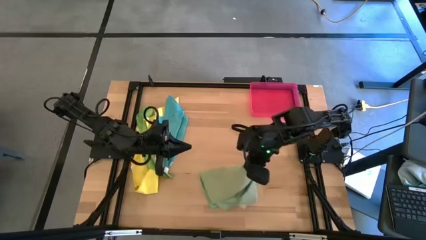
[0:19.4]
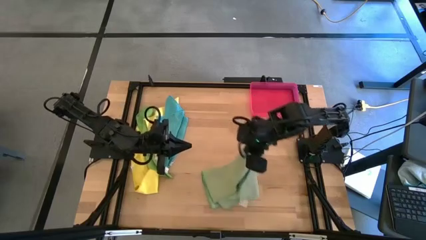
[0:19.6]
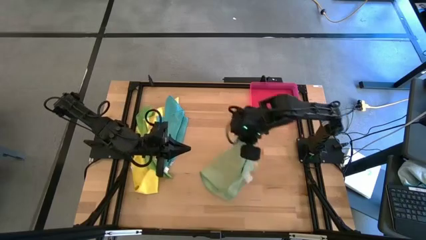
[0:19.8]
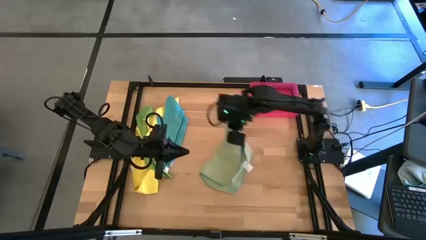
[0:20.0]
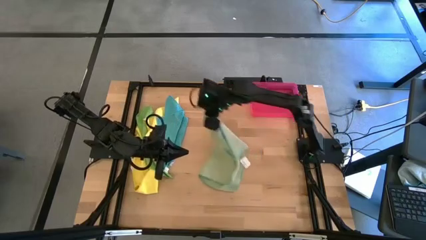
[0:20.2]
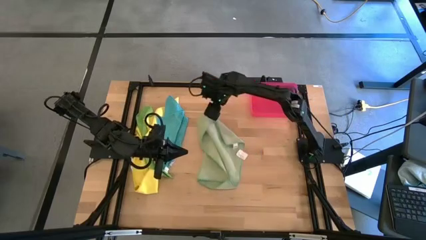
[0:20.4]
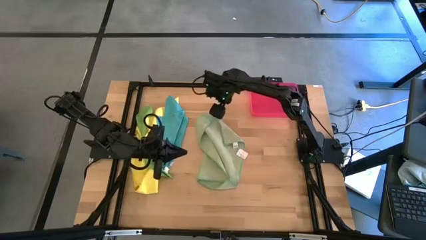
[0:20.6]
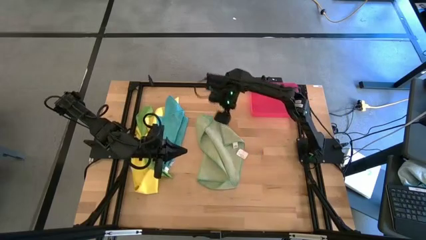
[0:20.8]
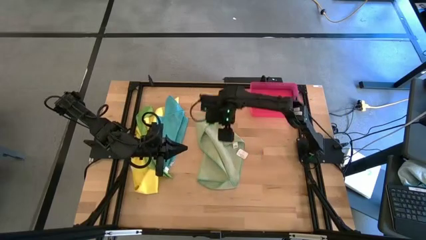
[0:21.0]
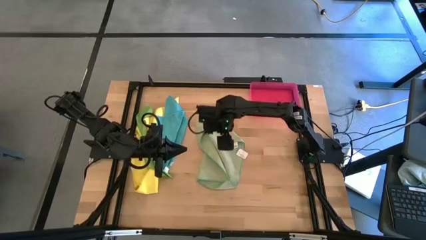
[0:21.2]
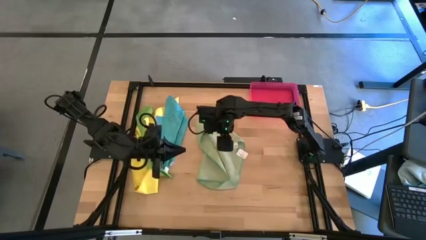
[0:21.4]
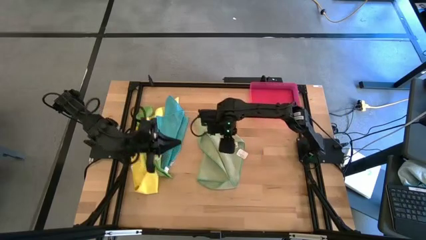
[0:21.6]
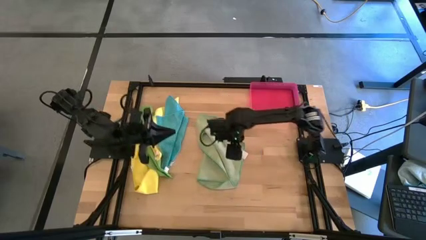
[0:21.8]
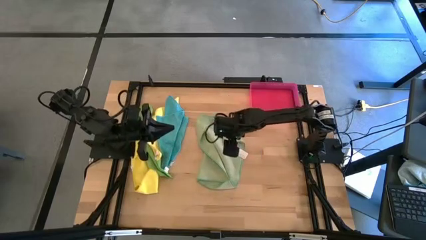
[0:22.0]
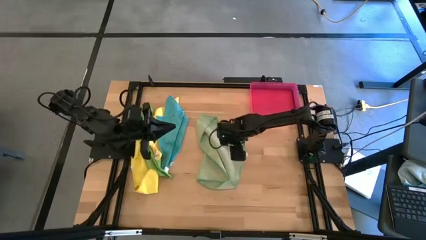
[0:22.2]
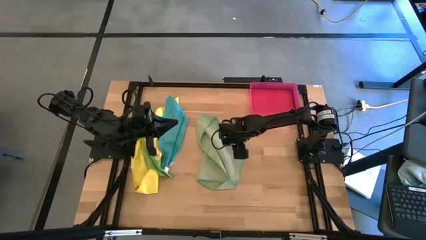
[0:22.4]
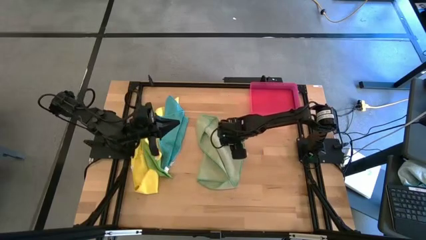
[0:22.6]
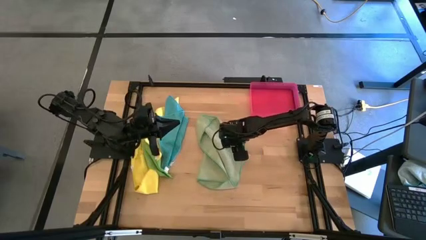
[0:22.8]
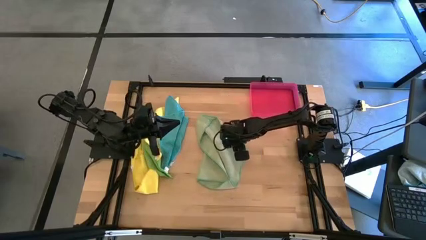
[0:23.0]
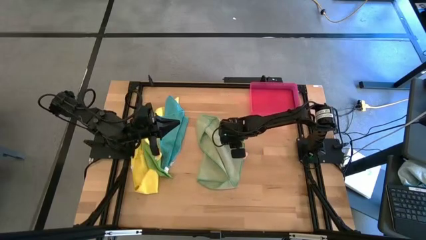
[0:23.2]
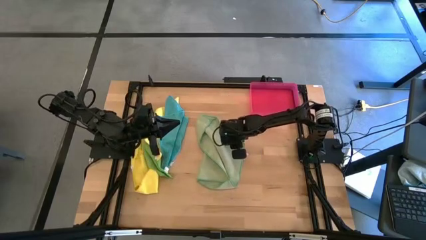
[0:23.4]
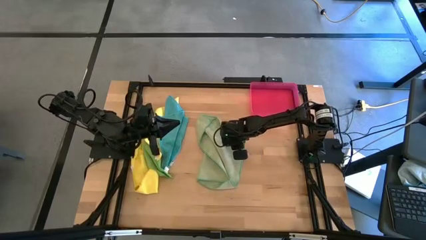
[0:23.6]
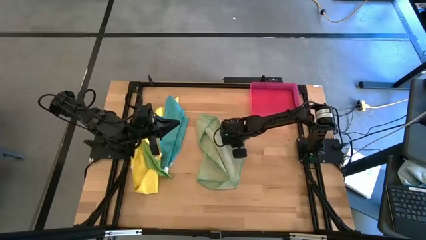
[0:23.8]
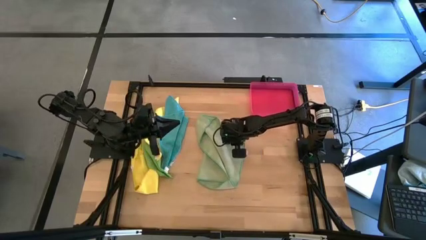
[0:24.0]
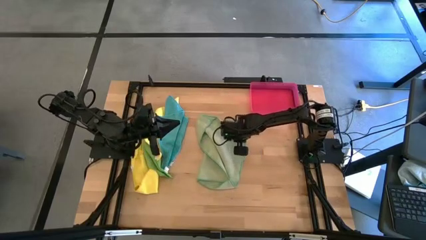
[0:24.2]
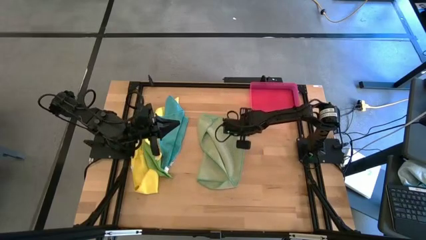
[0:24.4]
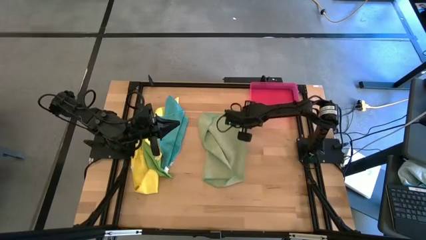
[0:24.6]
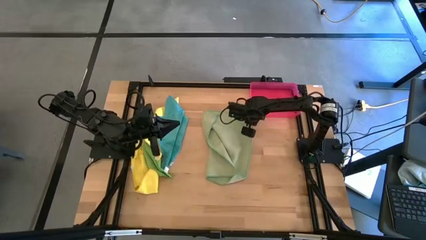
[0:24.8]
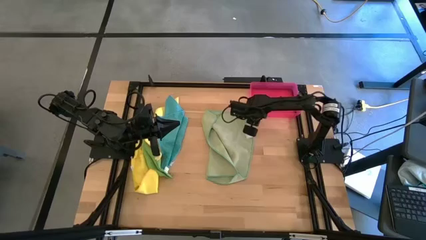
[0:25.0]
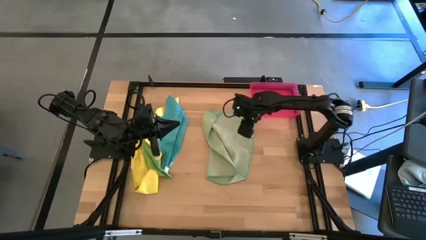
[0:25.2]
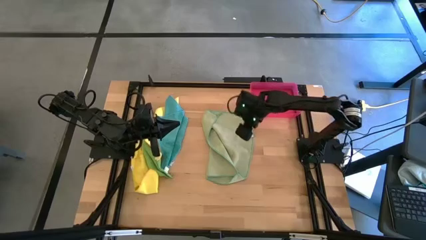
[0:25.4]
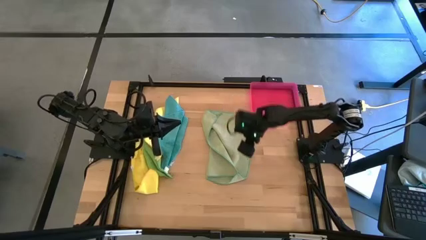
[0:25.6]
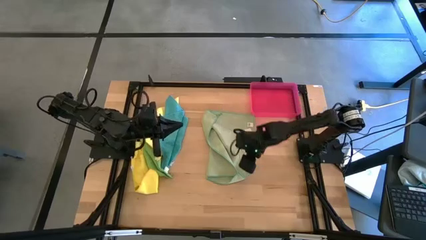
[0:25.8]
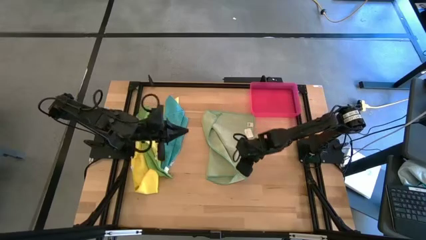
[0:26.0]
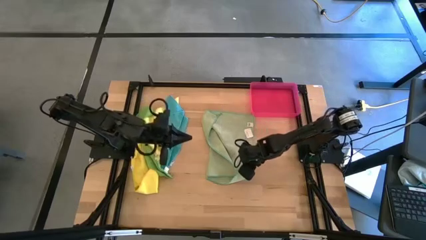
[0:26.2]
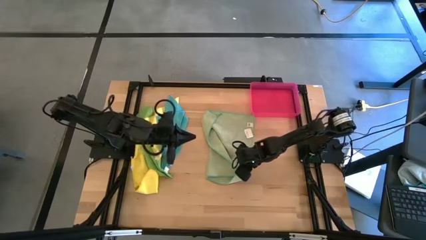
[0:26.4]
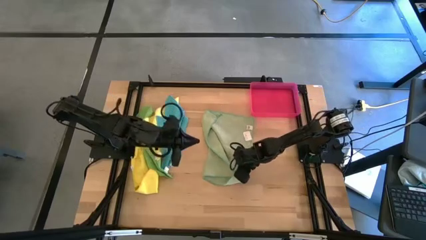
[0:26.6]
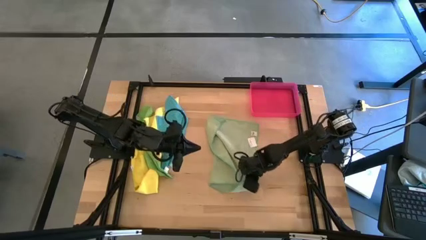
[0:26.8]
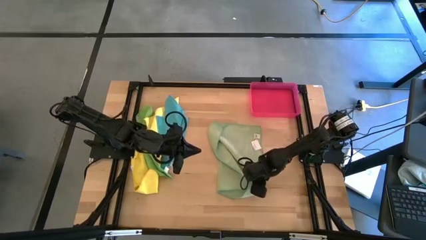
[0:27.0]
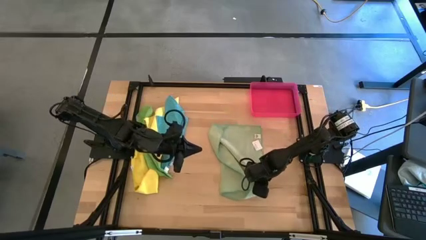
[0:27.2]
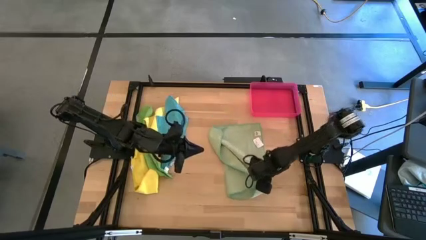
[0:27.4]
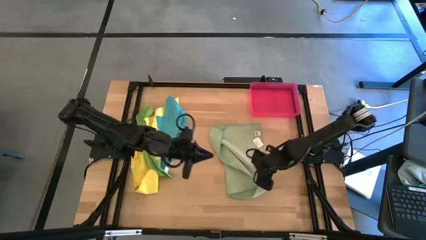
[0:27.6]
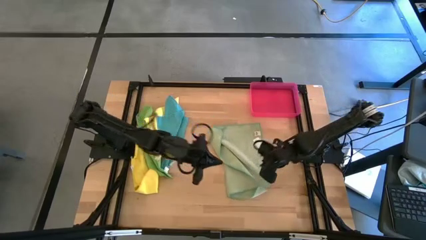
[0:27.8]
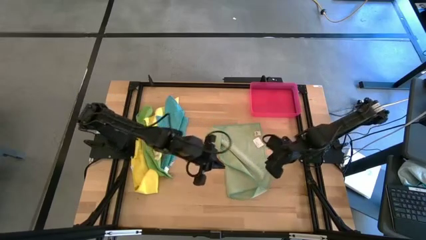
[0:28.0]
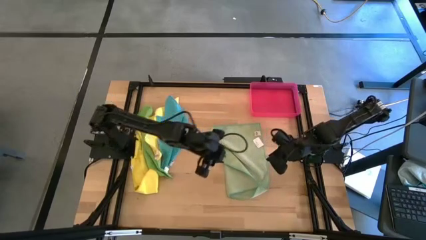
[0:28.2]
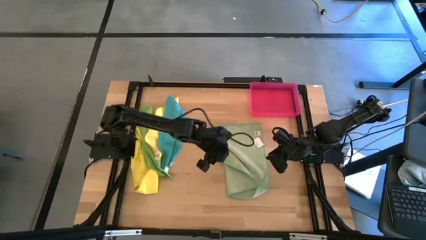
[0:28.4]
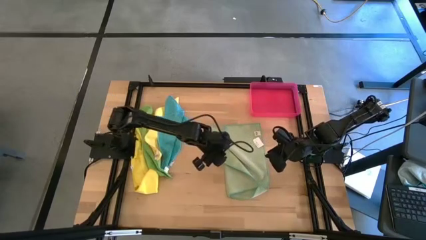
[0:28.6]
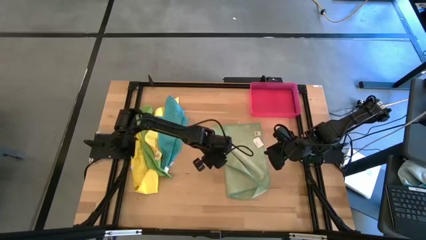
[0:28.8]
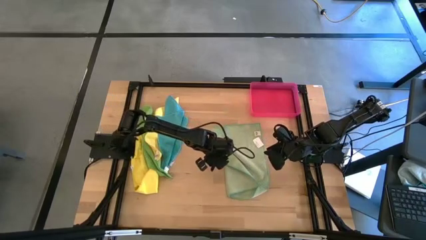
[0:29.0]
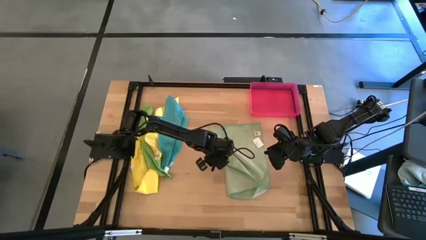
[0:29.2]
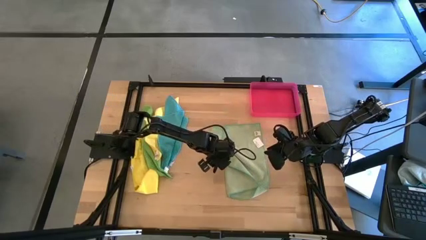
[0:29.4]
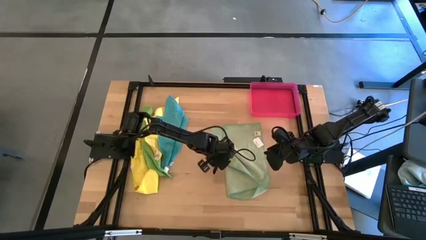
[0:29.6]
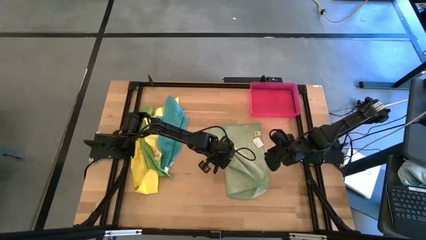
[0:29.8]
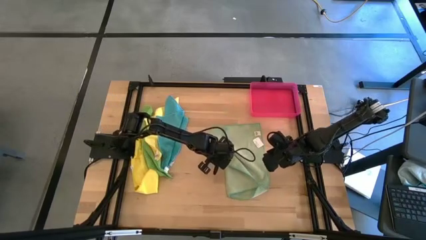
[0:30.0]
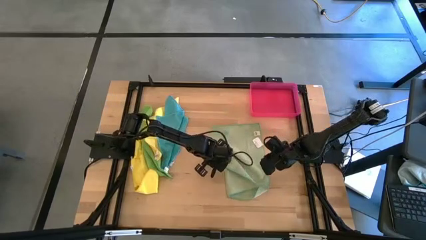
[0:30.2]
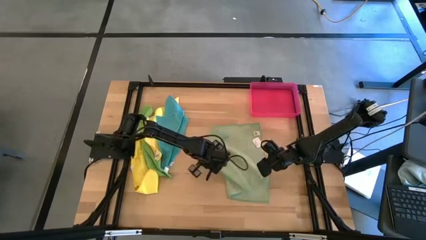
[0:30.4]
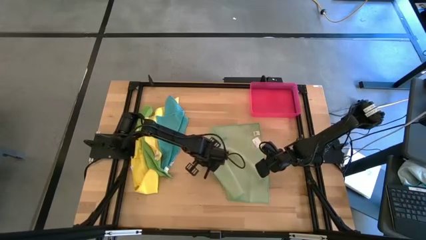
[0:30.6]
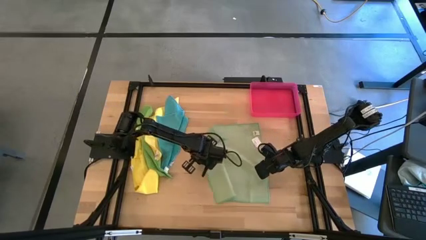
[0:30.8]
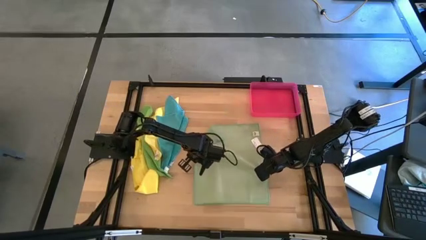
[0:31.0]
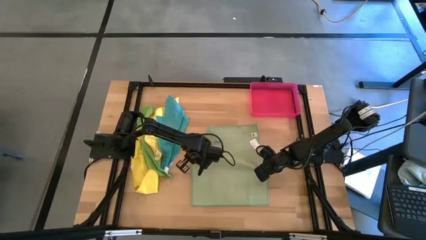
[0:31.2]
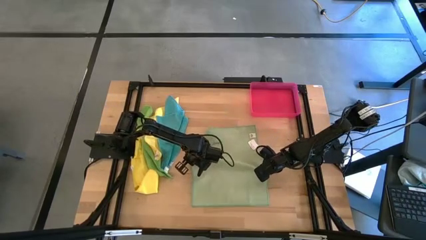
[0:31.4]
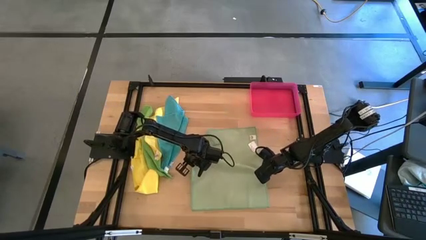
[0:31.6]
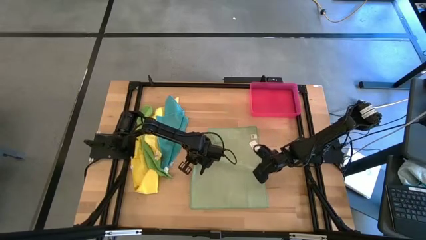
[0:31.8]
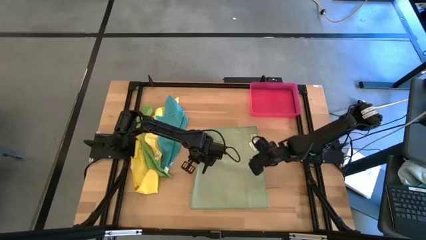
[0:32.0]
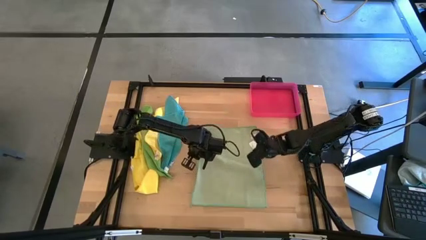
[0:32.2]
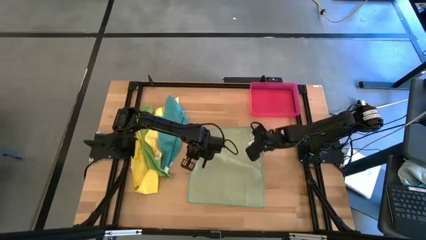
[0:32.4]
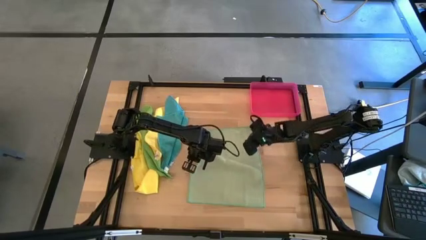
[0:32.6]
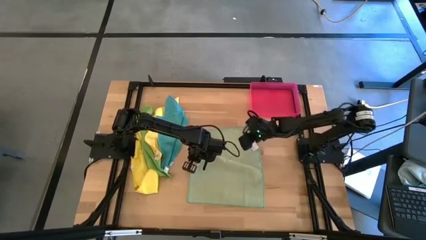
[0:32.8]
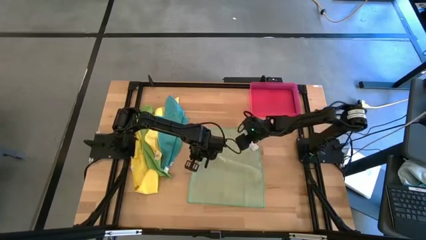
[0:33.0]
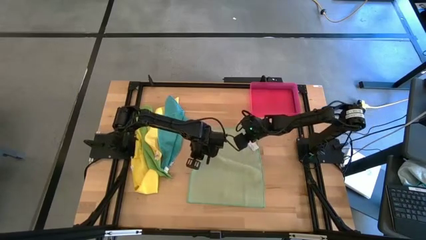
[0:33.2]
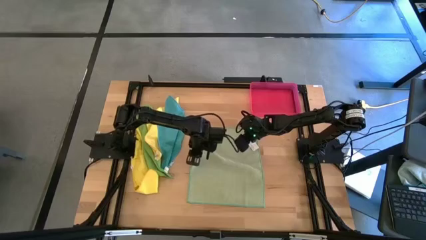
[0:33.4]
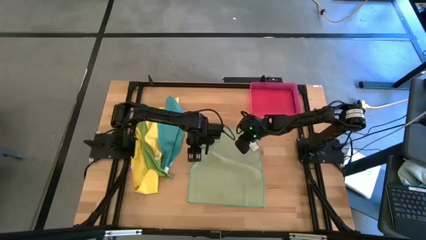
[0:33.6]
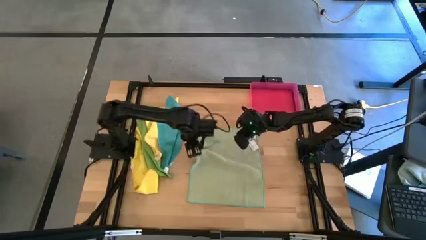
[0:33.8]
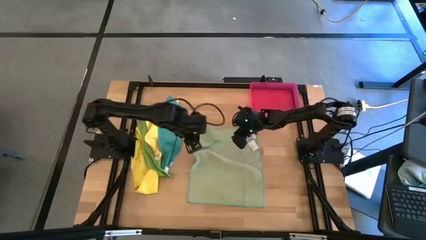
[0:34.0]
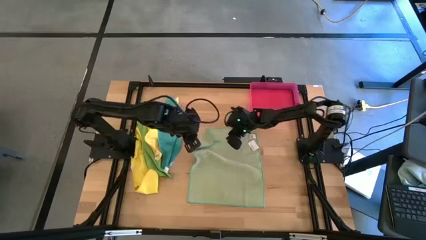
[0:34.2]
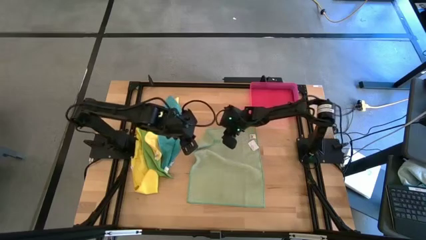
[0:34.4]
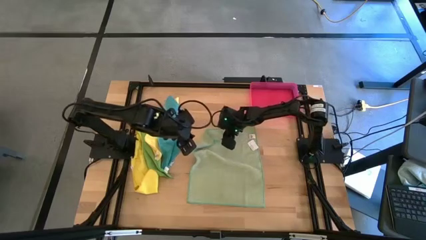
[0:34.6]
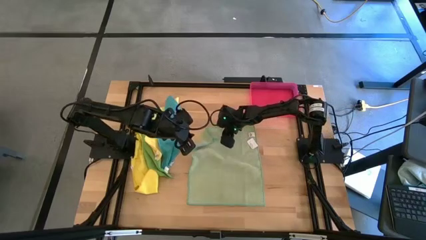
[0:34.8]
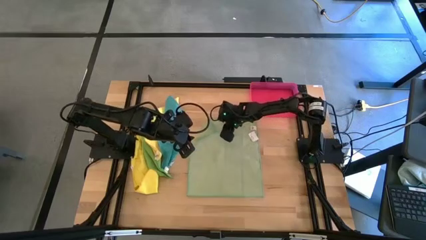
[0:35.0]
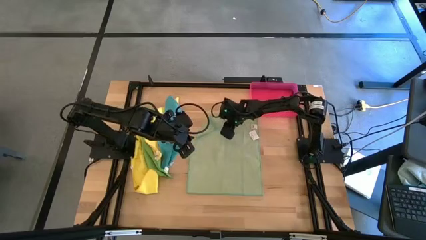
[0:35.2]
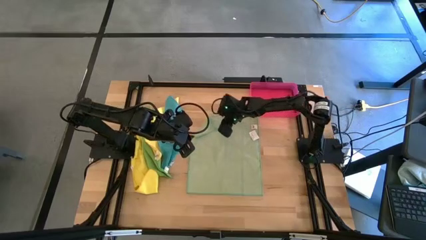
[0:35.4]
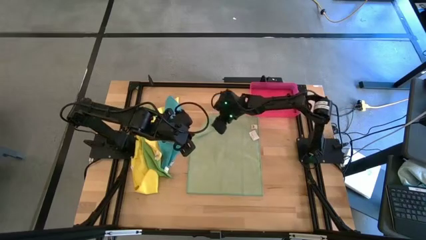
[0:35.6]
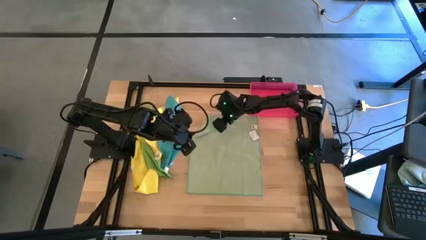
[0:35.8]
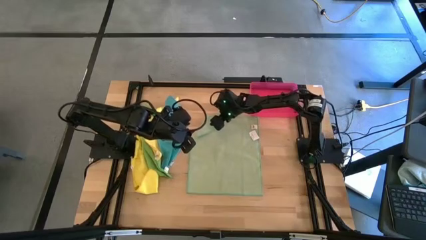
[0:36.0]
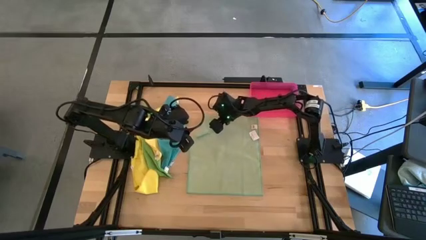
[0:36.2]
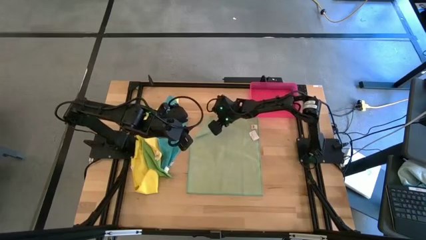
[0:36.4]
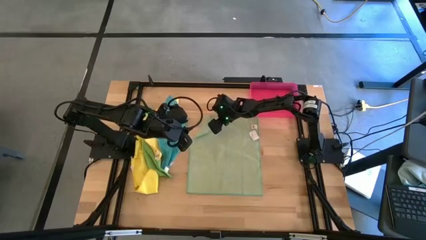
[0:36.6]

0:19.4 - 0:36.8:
Task: Fold microfiber towels
Fold the light green towel
